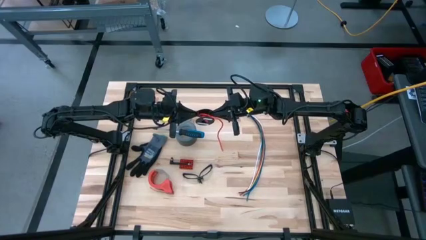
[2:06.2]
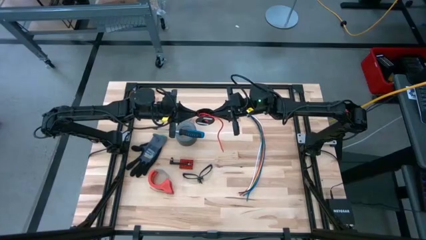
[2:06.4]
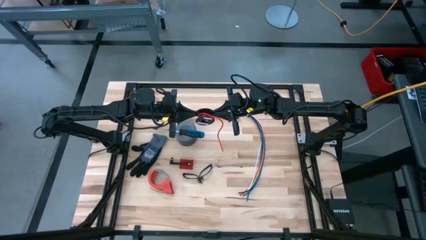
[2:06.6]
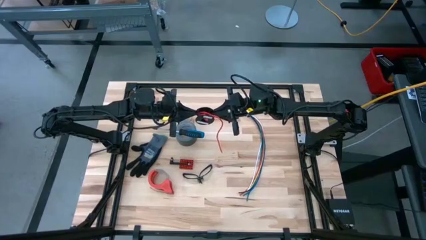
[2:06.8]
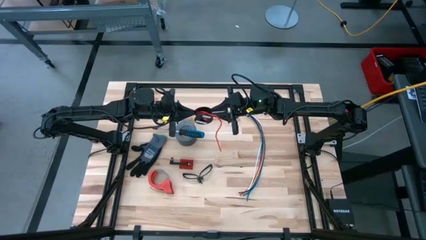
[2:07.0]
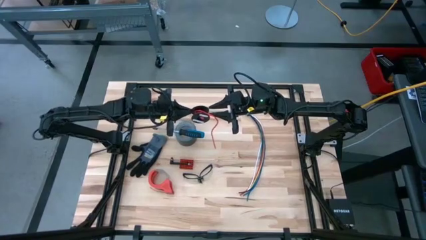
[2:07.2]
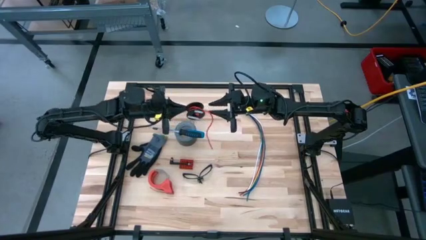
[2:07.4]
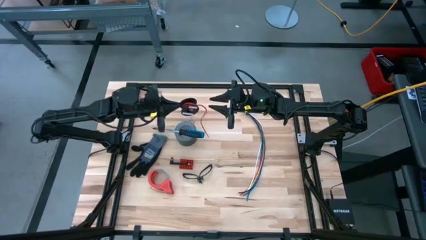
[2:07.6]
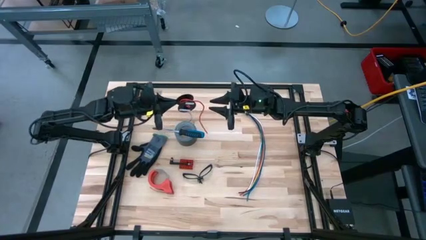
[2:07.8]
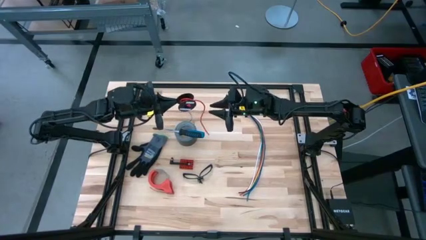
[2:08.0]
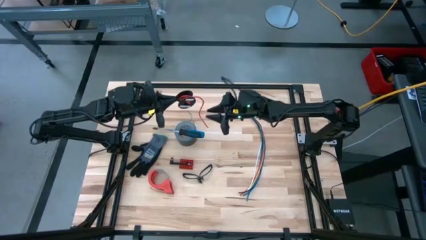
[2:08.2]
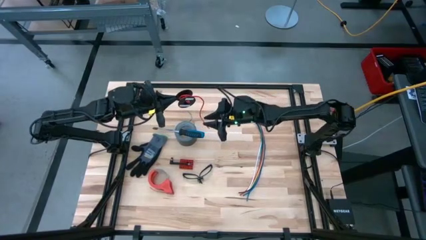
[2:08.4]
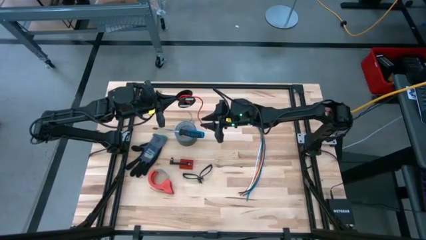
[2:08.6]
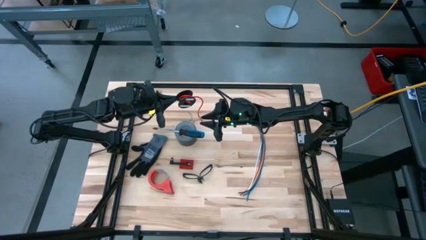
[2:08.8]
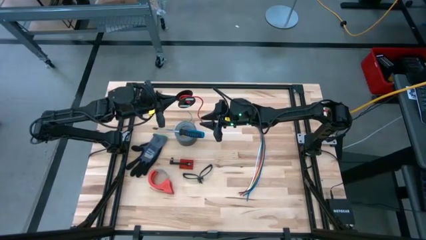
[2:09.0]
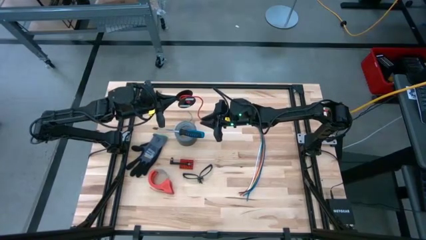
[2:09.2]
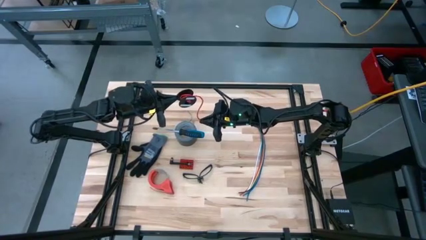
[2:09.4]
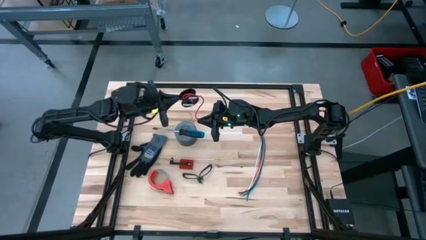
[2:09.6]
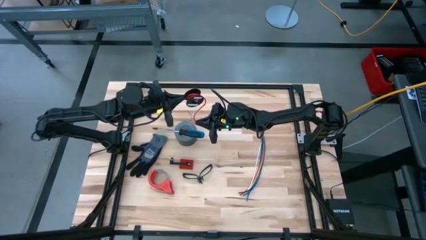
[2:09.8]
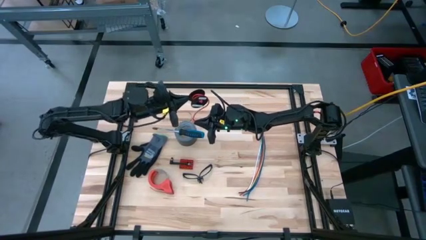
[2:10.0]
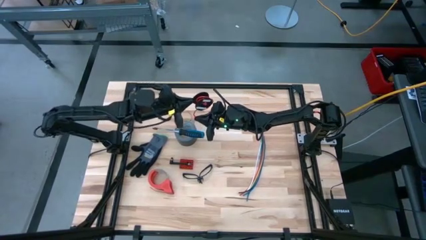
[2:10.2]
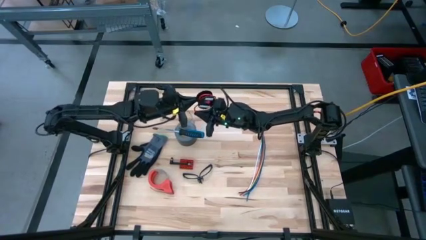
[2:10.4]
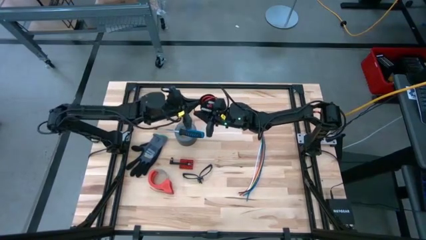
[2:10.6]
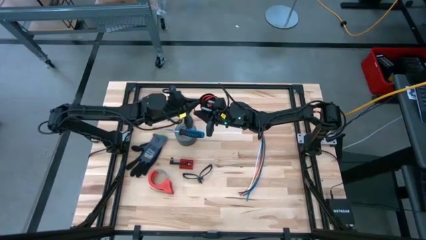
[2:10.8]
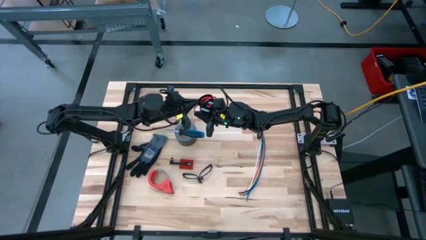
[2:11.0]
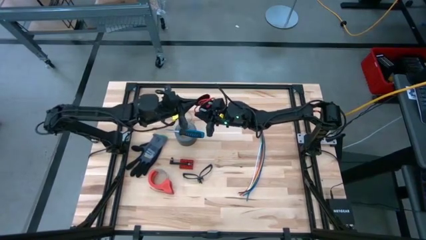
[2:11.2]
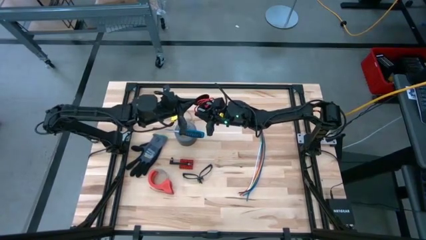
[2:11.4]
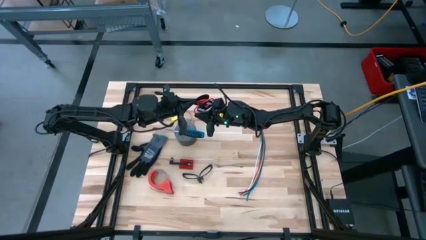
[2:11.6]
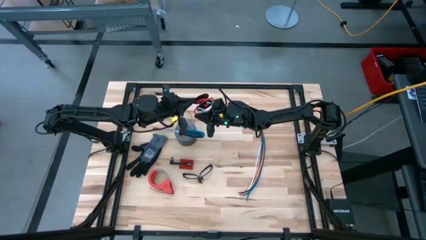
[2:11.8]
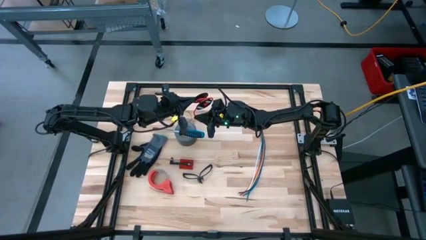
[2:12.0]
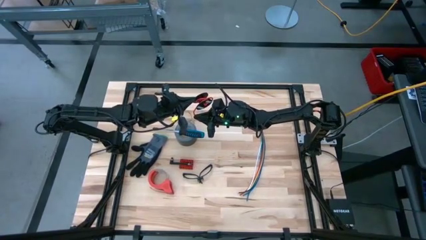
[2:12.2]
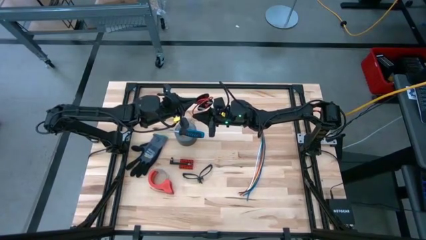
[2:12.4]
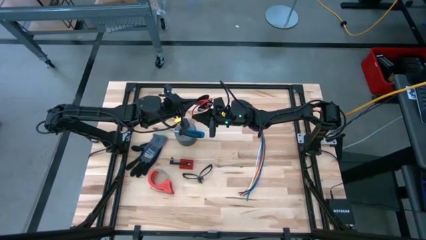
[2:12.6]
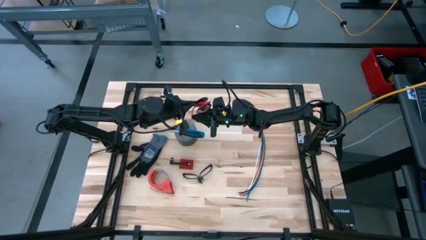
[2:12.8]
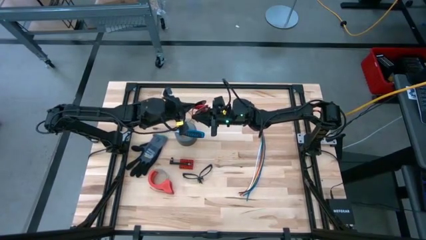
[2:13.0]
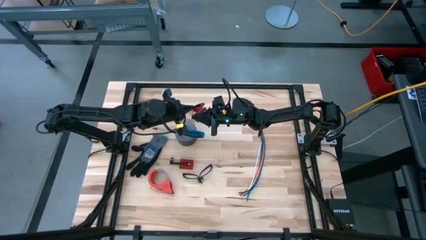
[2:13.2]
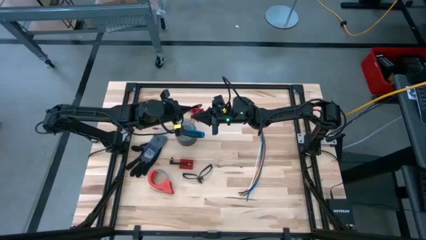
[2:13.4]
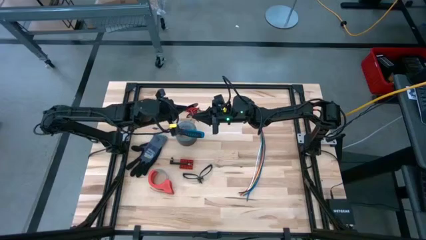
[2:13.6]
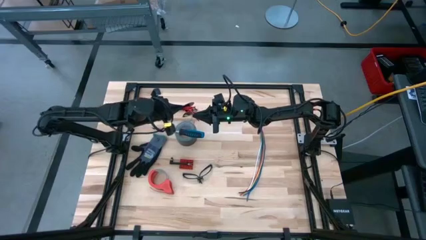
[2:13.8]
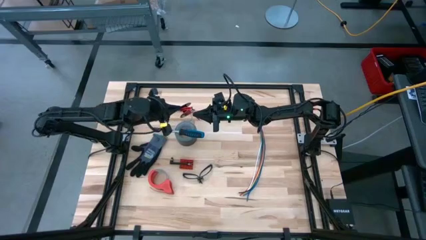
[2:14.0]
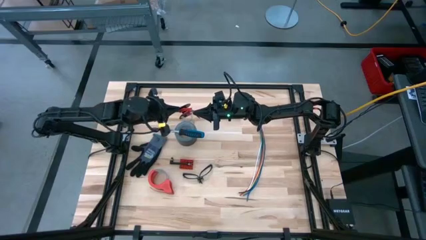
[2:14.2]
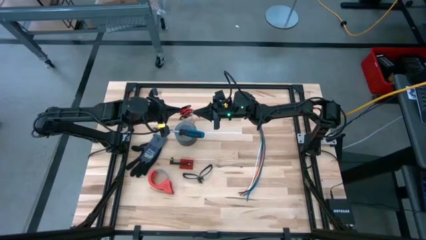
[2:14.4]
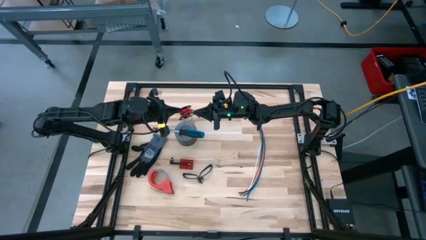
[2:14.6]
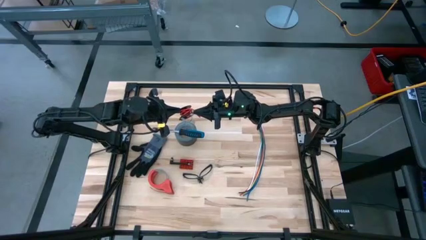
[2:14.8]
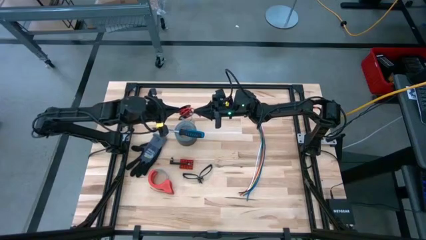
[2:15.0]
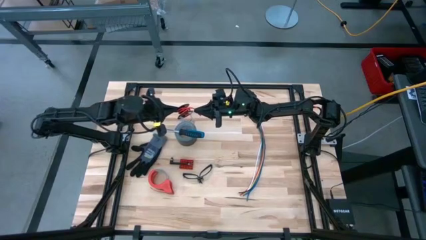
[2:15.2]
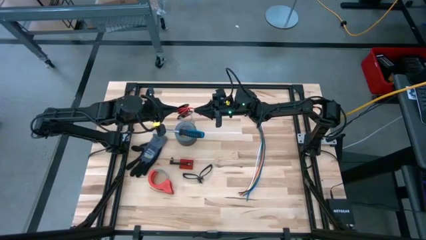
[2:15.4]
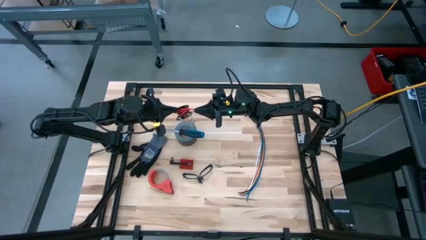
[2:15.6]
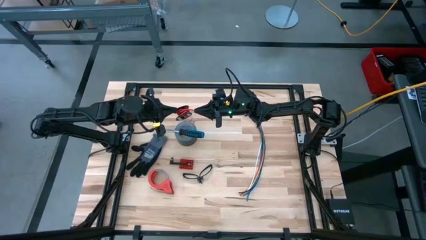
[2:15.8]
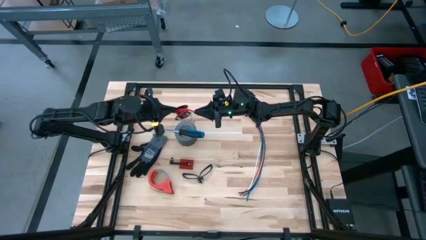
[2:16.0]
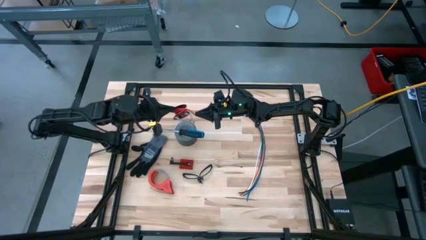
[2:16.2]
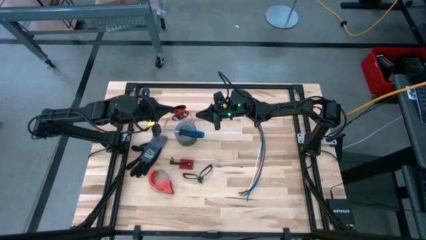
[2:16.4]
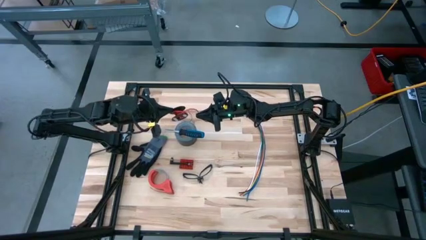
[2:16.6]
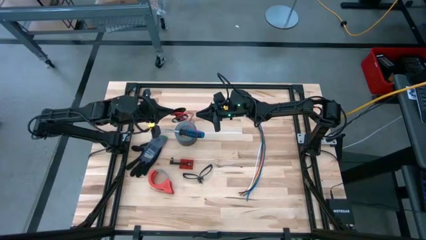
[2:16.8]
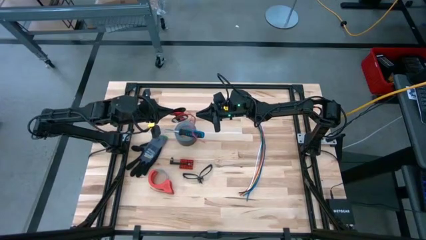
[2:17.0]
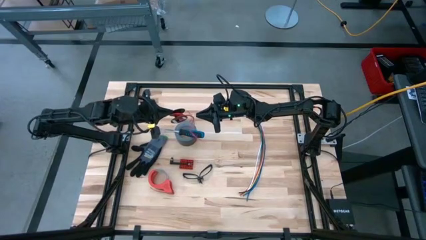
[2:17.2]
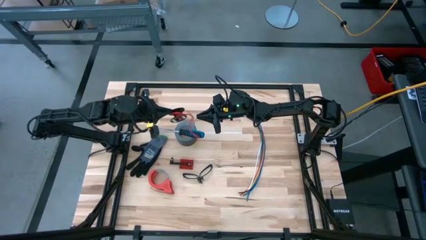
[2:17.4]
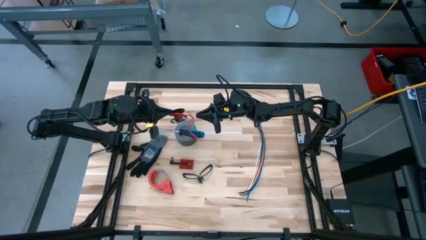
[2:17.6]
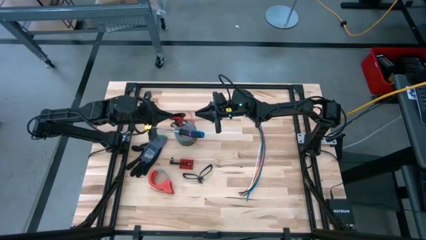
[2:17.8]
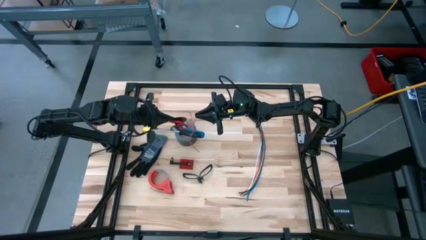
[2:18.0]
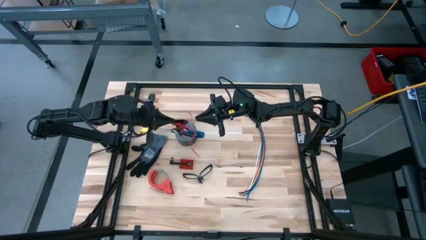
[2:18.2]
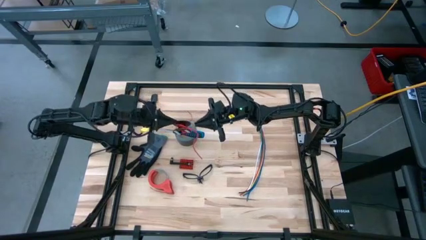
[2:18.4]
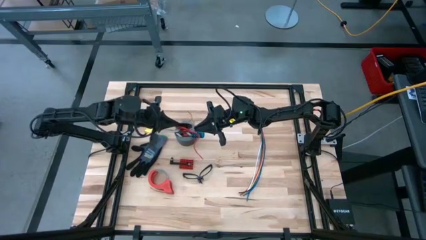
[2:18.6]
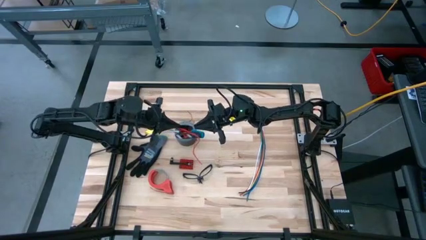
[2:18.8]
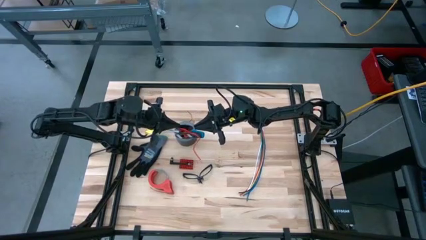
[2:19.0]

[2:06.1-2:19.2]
Task: Coil cords
Coil the red wire into the black spool

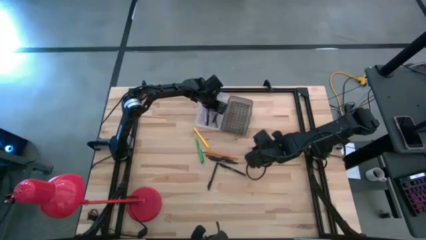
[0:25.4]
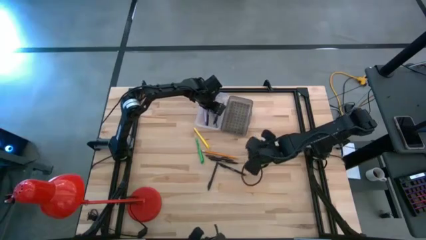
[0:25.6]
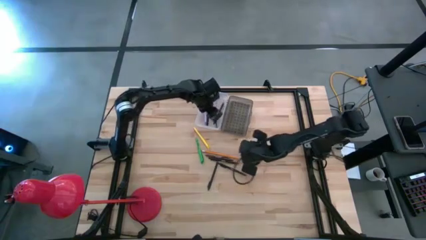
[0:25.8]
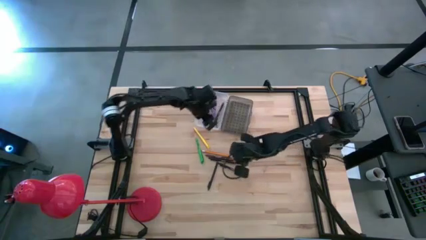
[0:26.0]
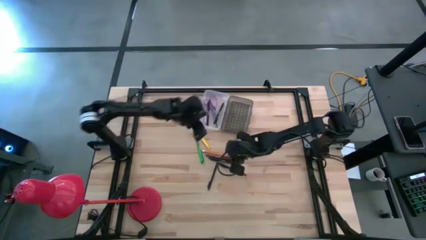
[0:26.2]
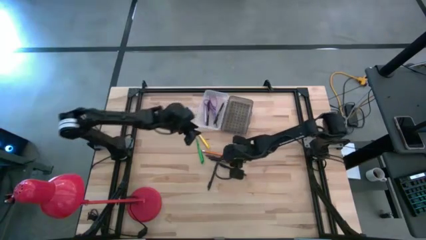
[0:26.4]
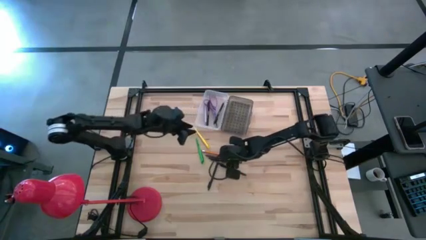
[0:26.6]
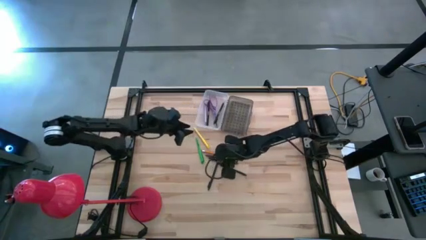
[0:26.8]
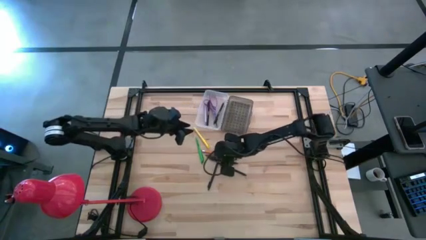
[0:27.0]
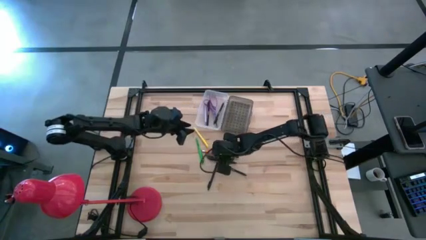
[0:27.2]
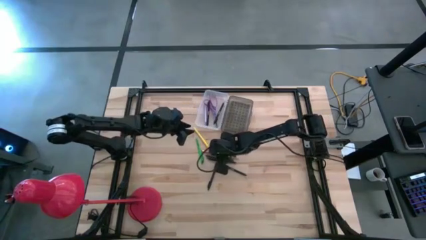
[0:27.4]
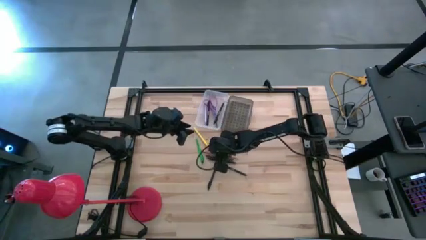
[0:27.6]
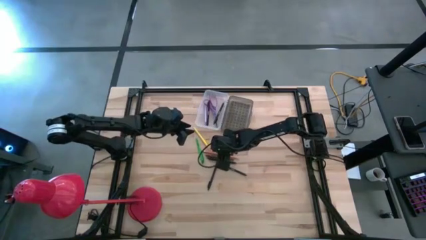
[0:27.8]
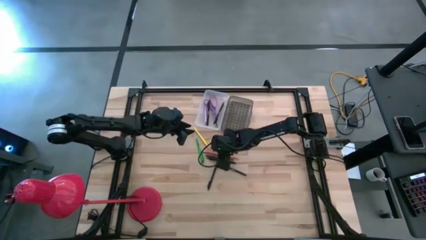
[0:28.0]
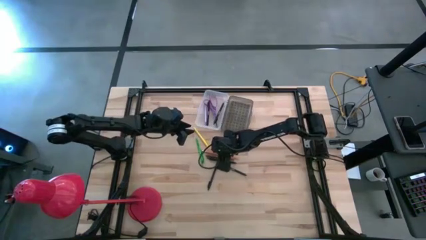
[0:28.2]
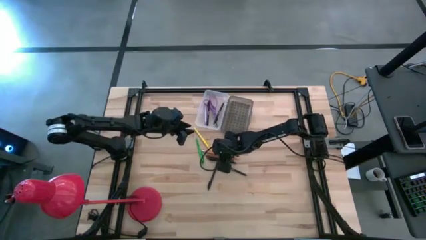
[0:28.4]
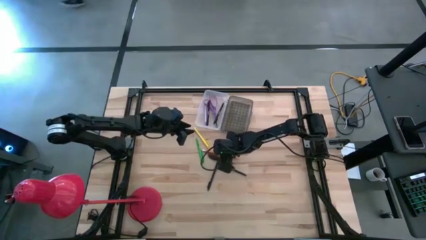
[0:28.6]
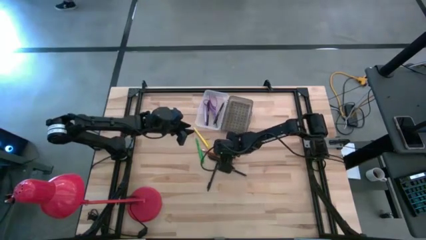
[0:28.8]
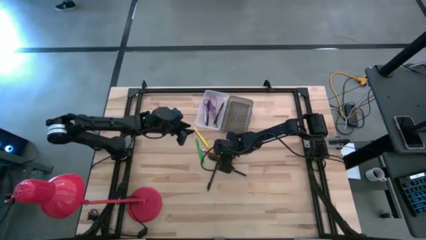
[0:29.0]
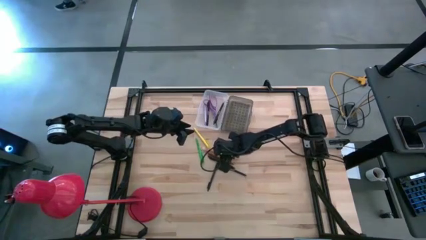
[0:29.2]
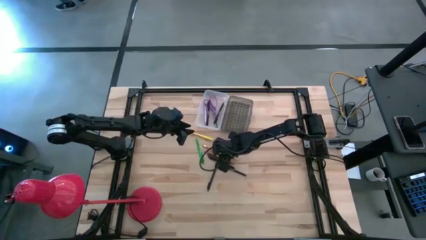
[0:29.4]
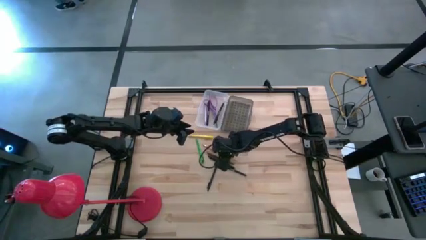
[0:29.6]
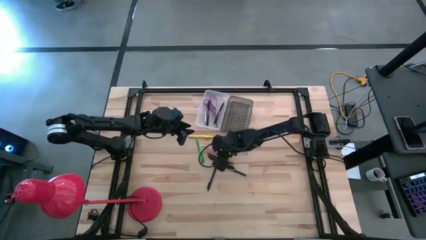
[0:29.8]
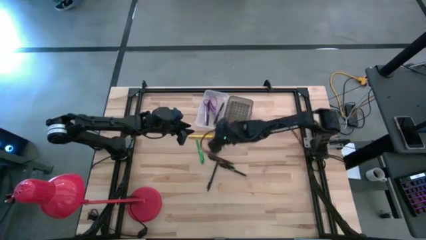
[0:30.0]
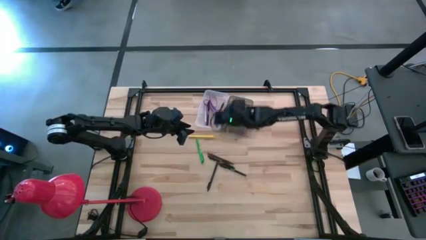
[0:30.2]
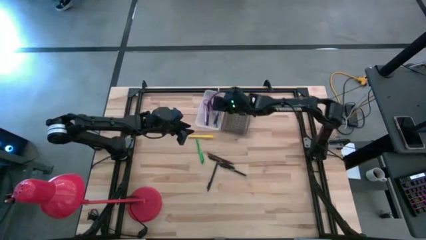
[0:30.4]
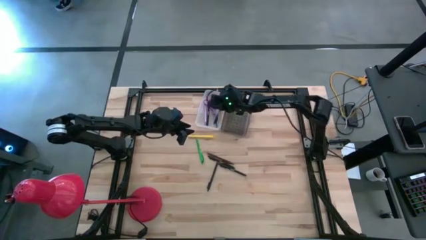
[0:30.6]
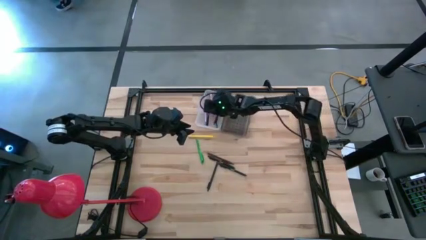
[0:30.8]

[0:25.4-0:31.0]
Task: Pick & place school supplies into a supply box
Put the orange pencil into the transparent supply box
